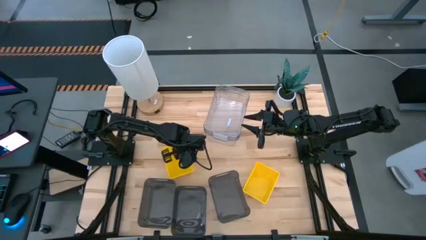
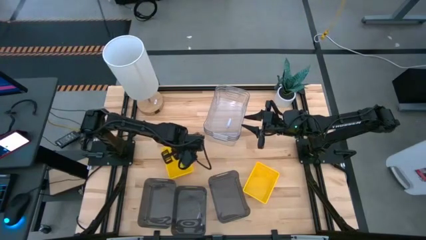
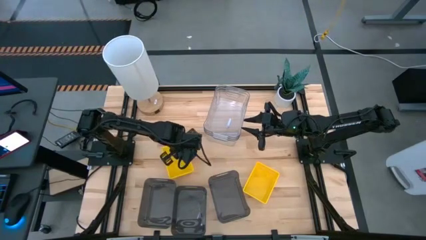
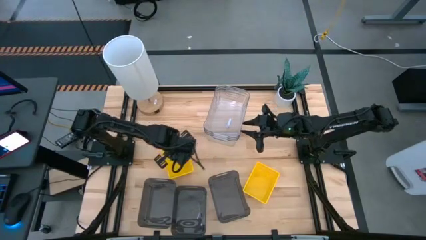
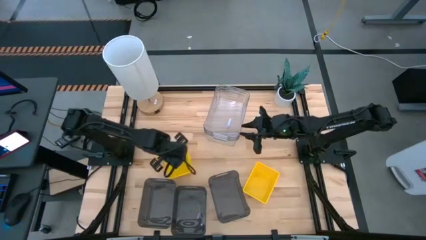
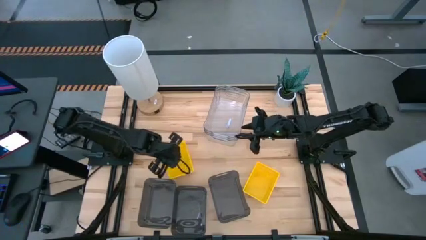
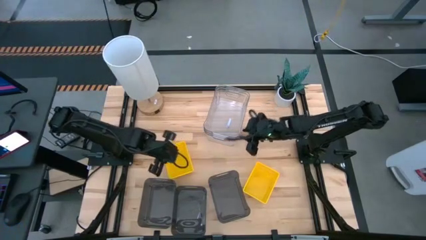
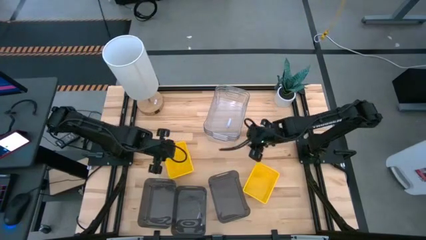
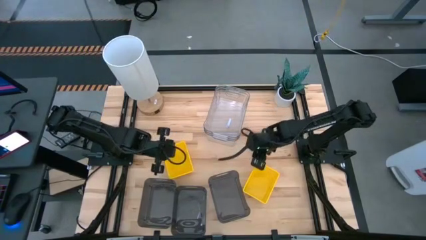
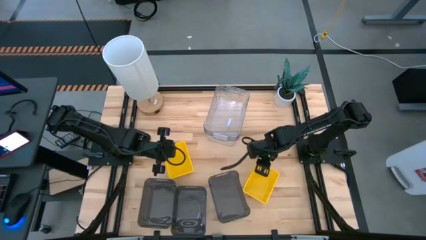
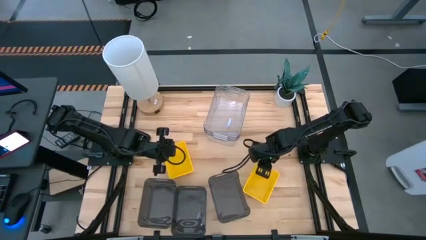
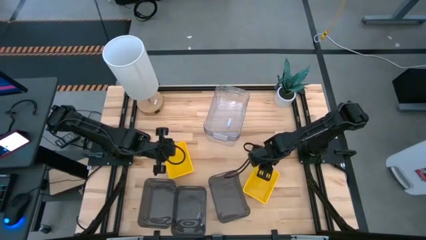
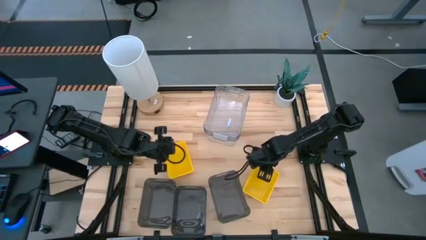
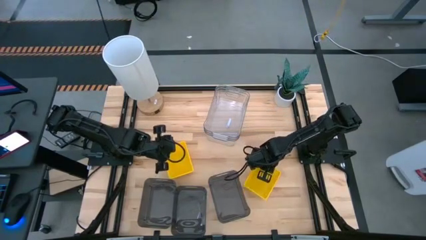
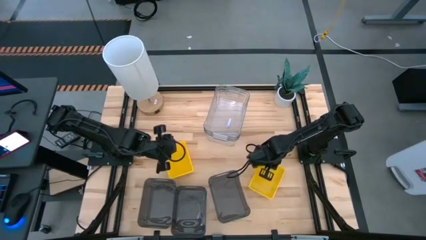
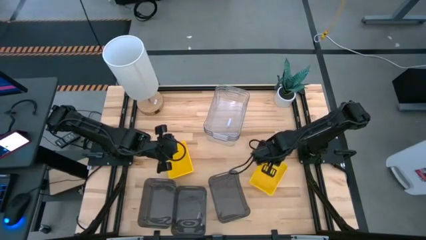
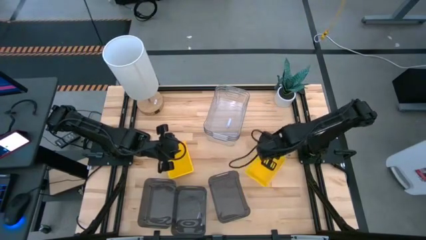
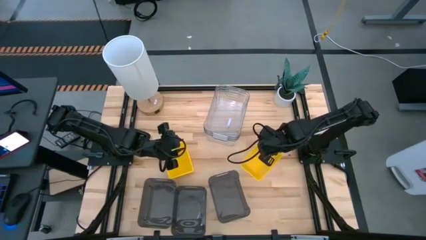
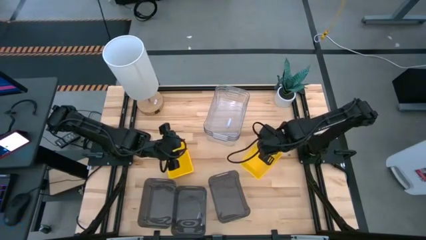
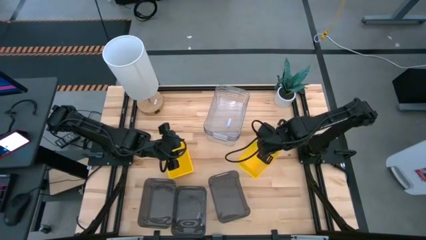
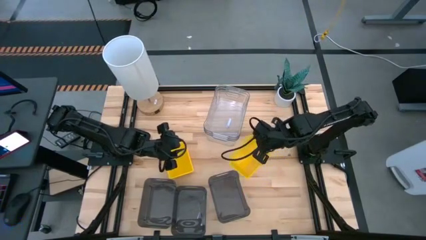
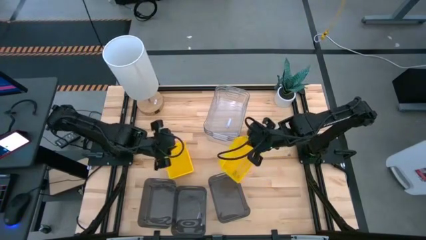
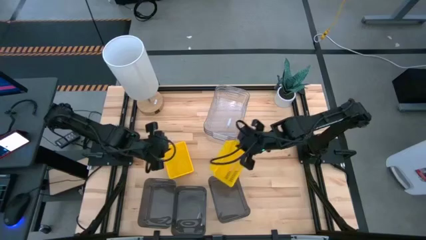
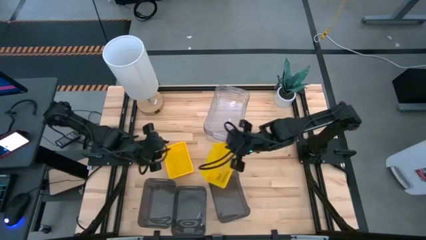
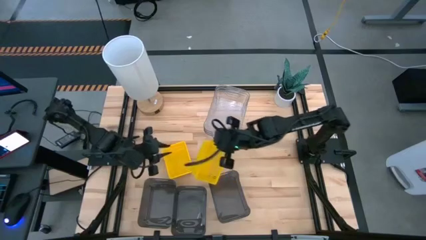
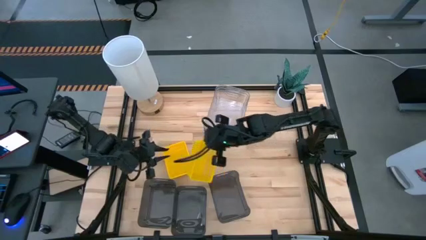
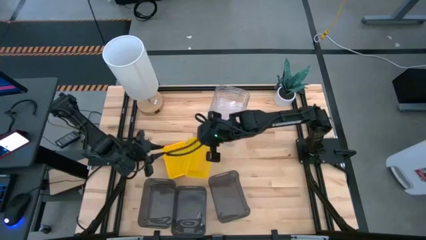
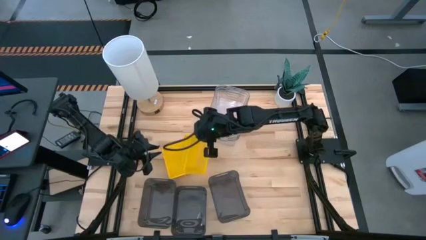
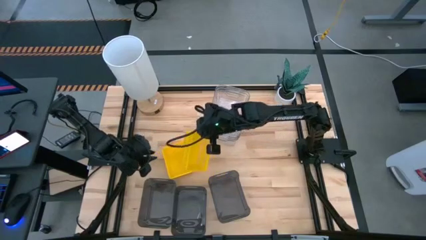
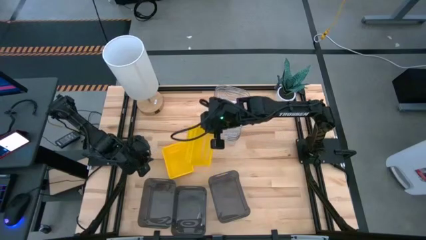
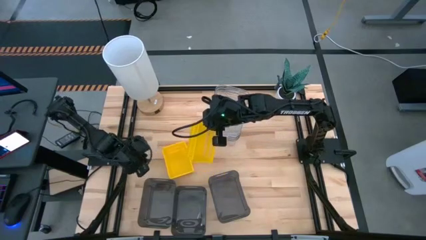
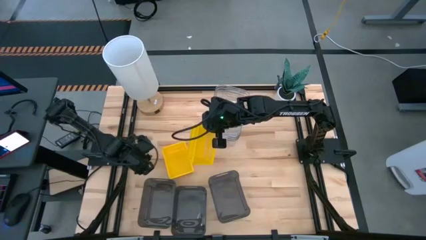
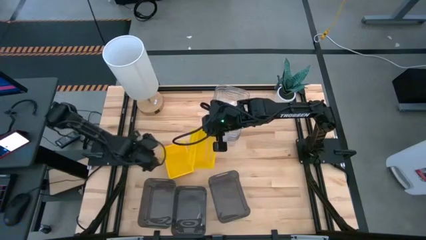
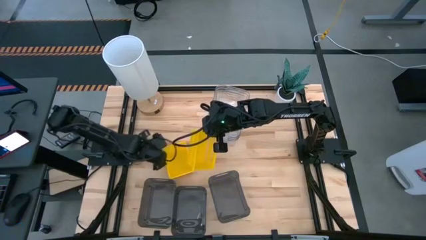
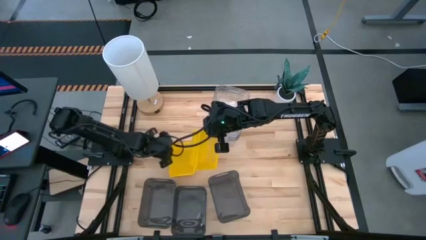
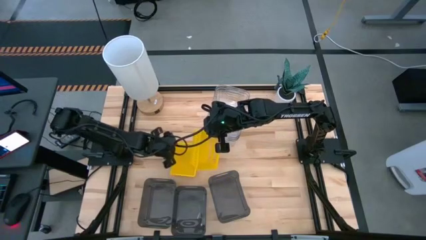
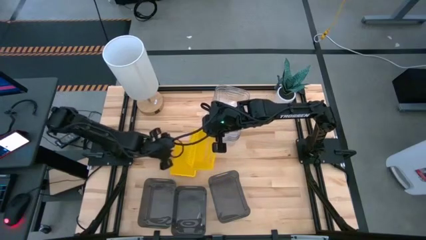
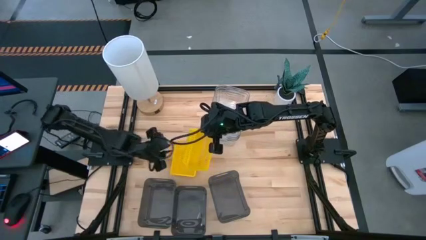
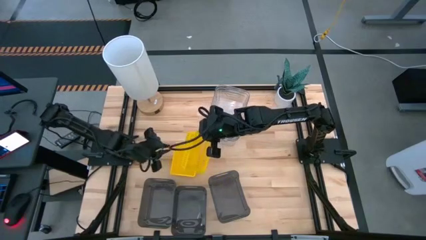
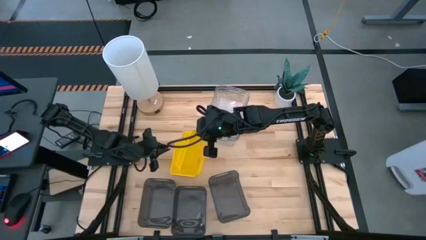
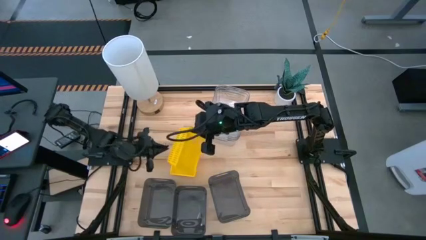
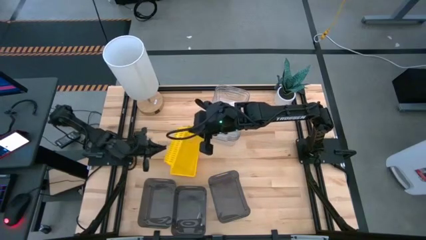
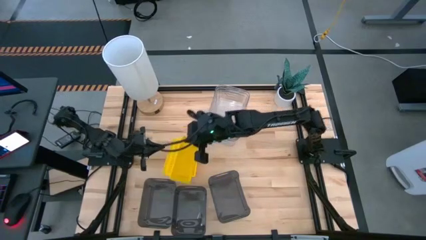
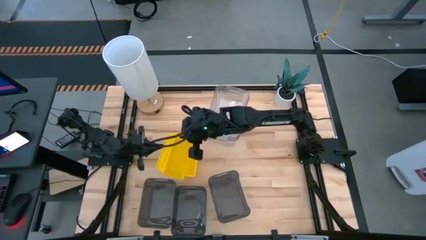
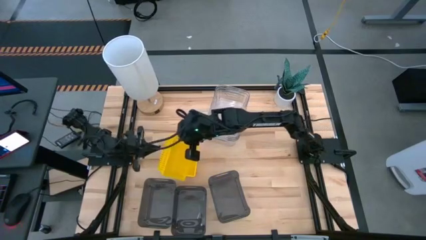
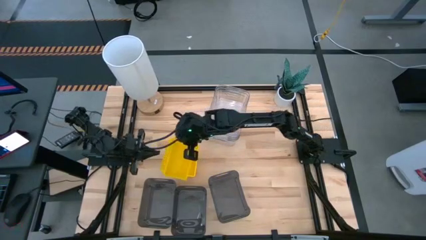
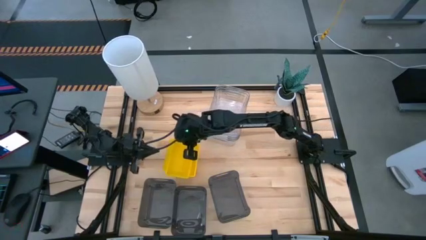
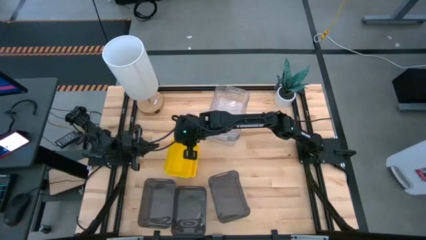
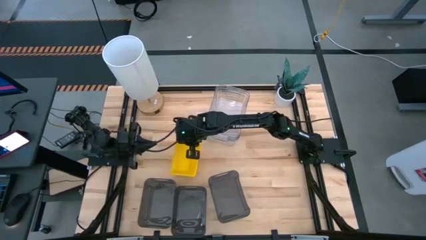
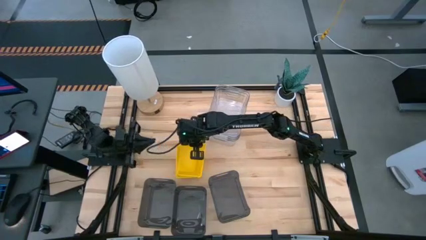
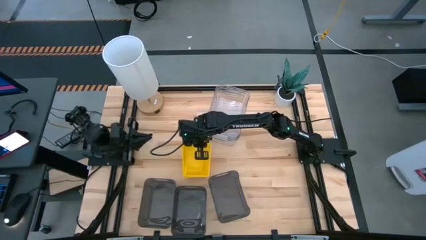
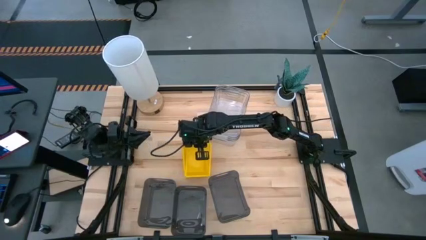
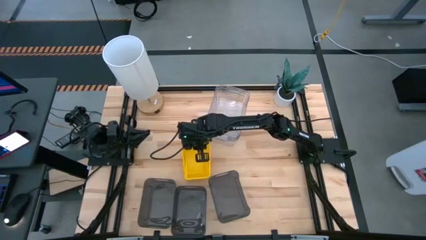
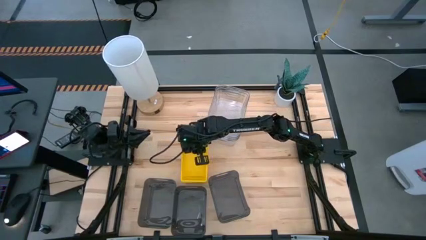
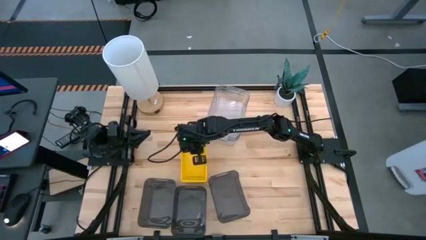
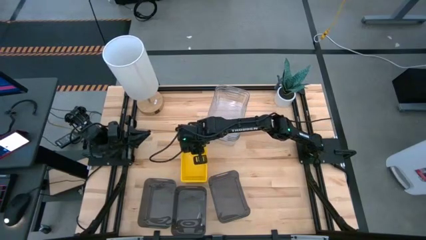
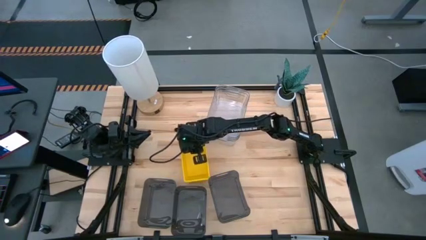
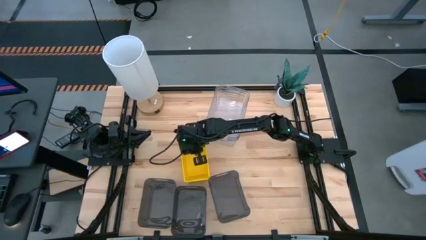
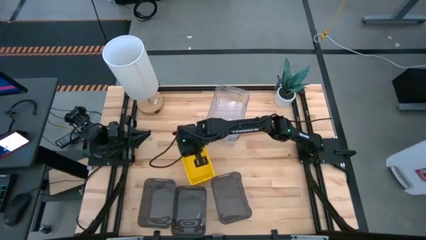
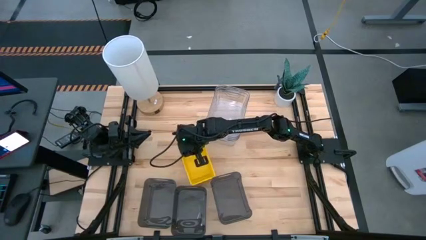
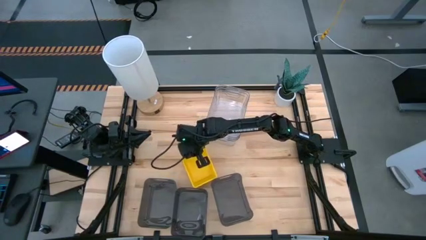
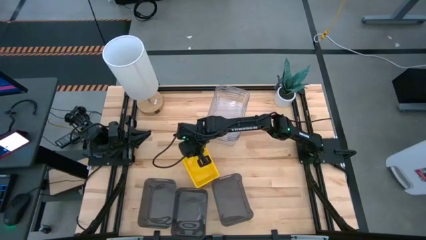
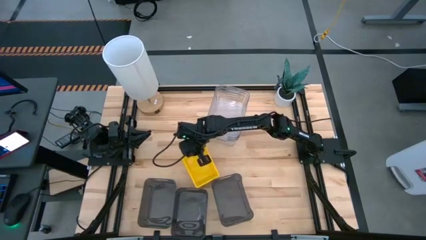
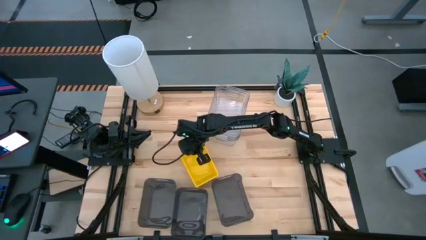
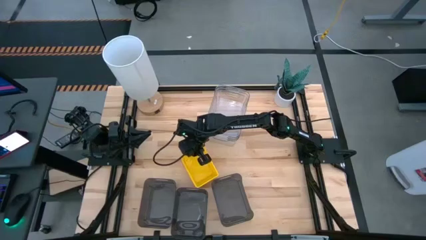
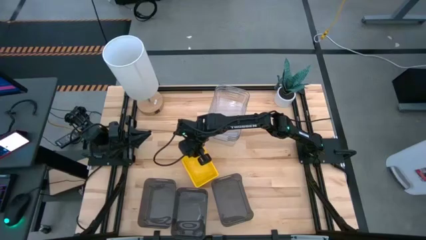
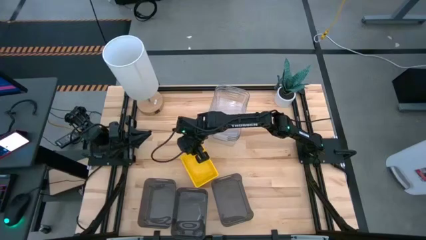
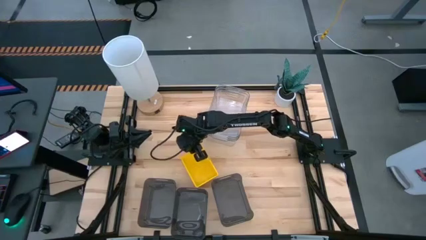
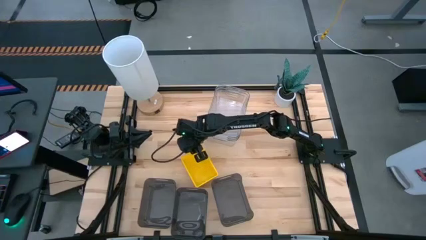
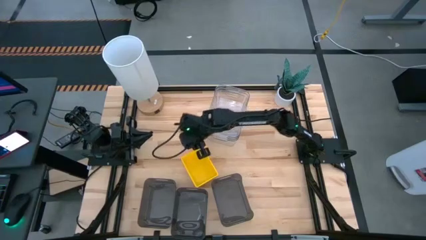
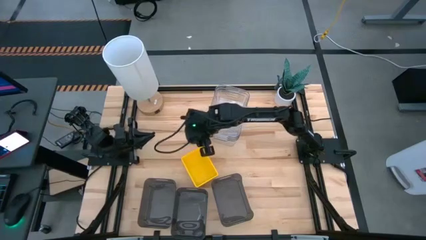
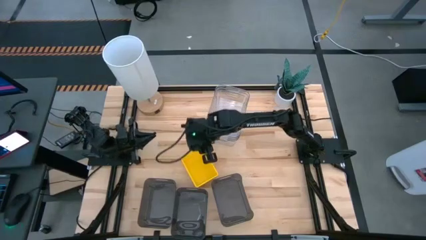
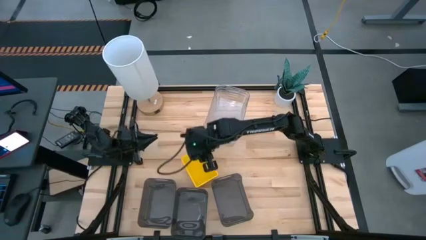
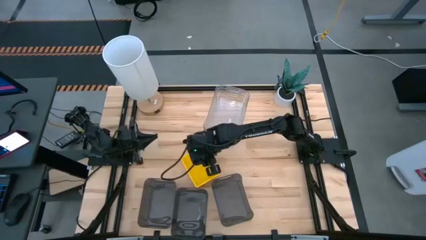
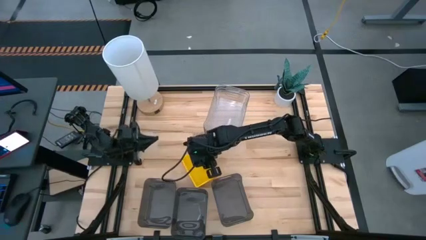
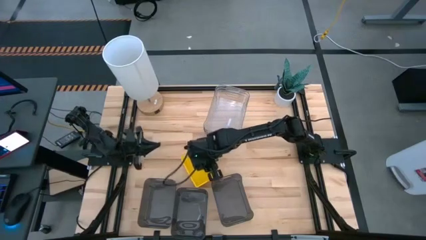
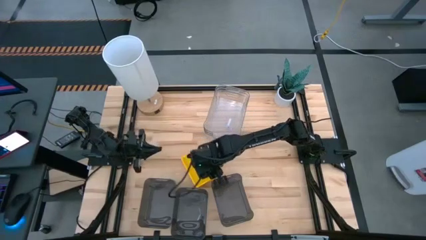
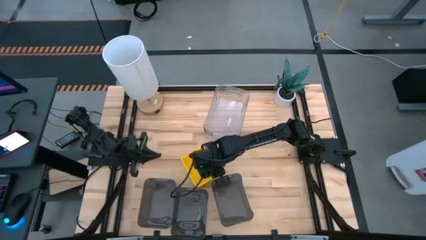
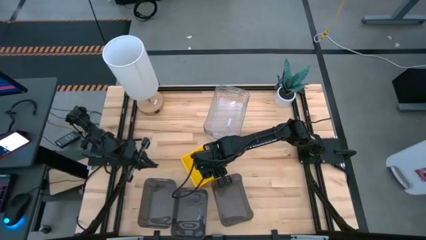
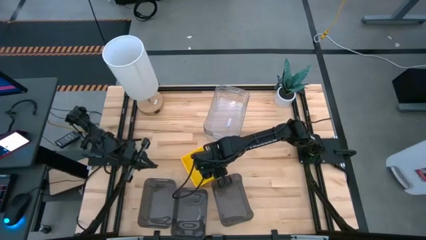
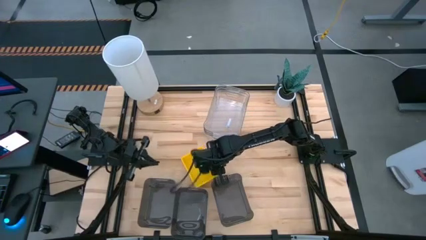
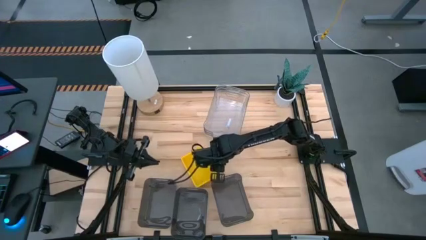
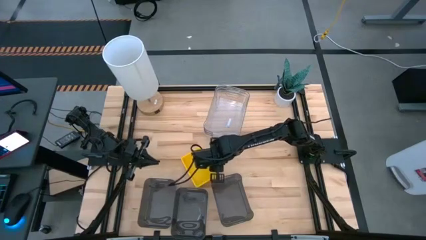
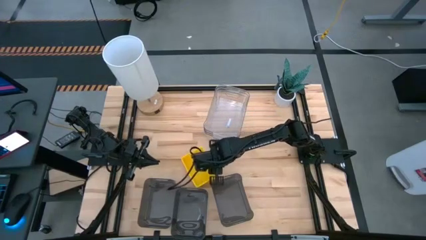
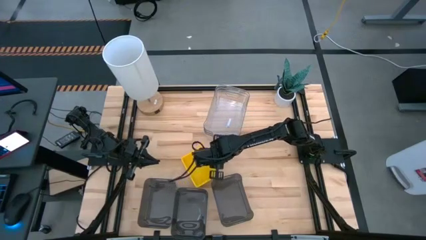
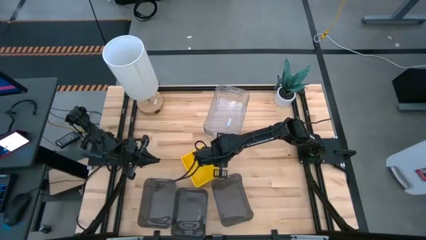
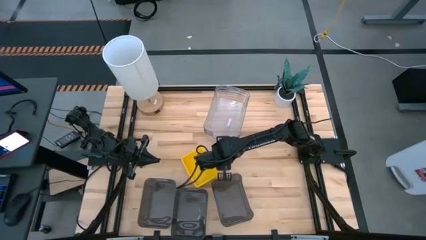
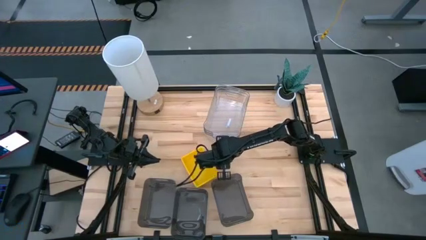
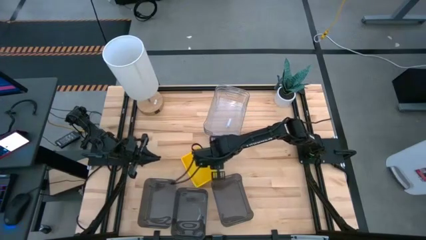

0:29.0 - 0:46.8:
Stack the yellow bin on top of the yellow bin
